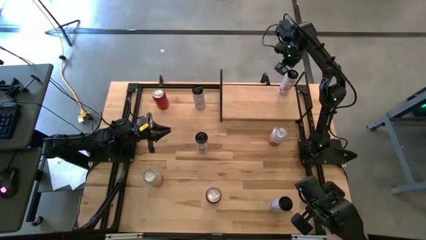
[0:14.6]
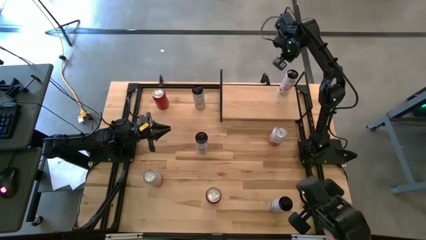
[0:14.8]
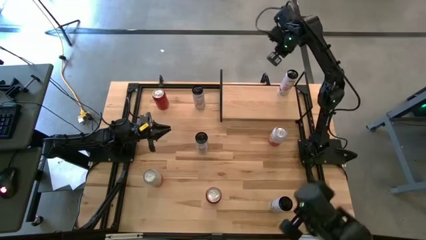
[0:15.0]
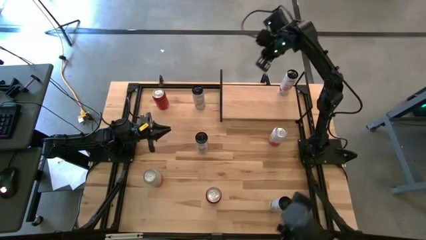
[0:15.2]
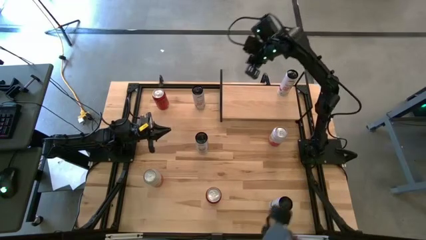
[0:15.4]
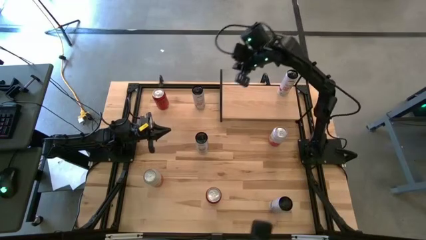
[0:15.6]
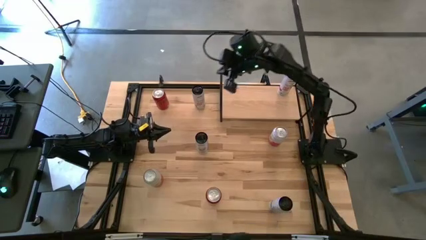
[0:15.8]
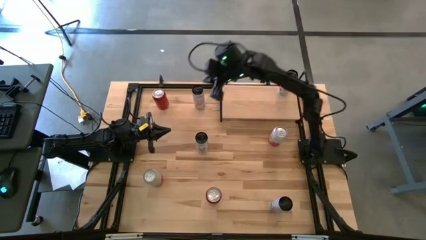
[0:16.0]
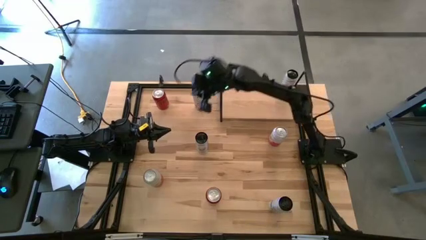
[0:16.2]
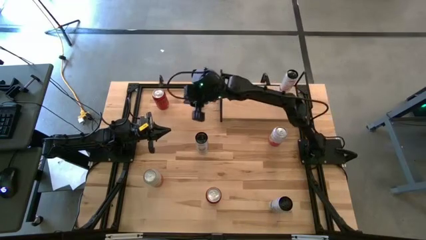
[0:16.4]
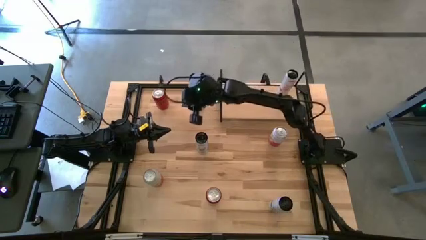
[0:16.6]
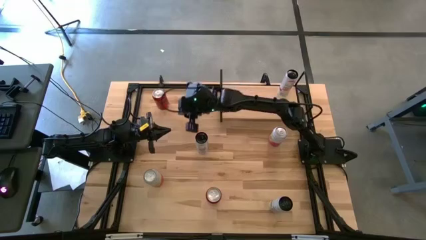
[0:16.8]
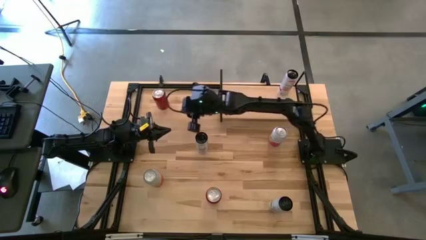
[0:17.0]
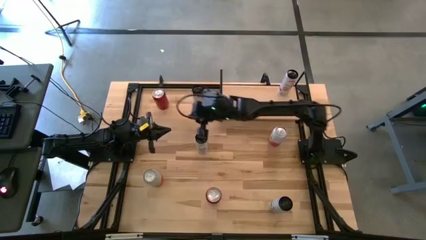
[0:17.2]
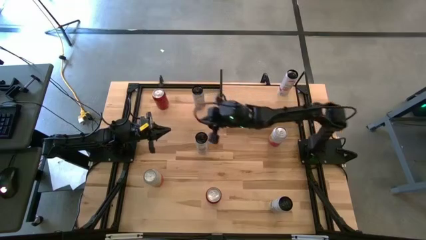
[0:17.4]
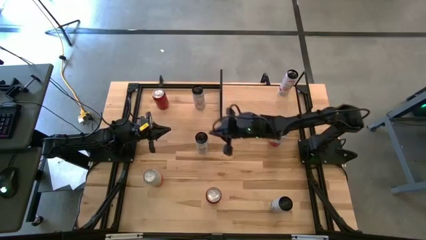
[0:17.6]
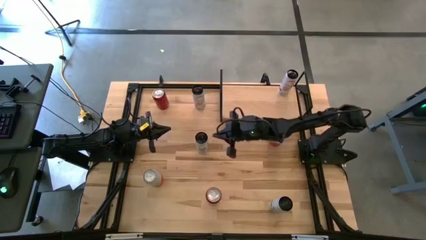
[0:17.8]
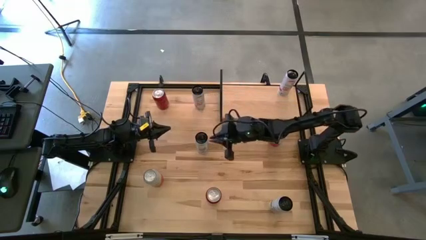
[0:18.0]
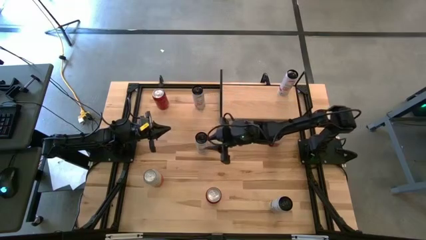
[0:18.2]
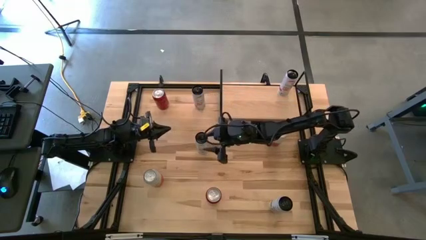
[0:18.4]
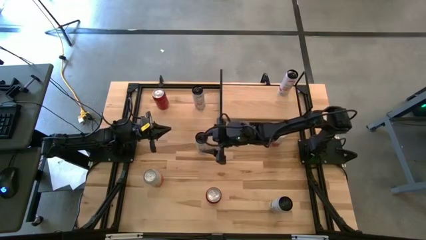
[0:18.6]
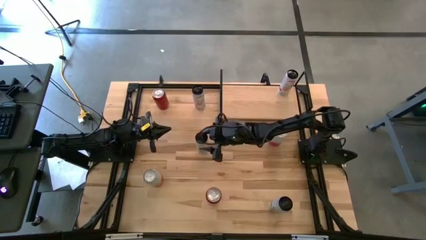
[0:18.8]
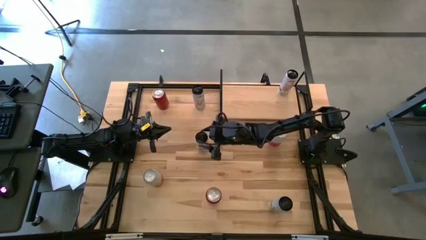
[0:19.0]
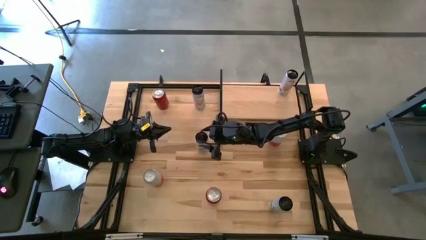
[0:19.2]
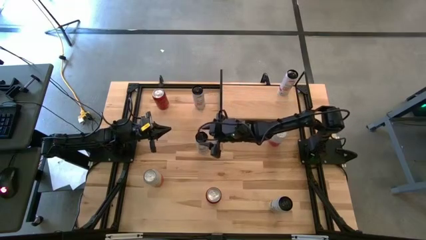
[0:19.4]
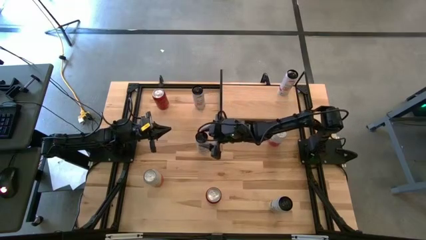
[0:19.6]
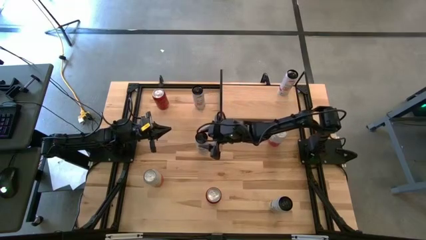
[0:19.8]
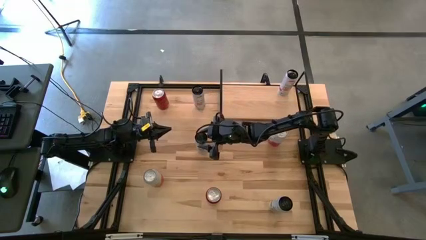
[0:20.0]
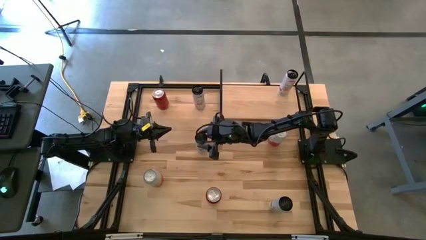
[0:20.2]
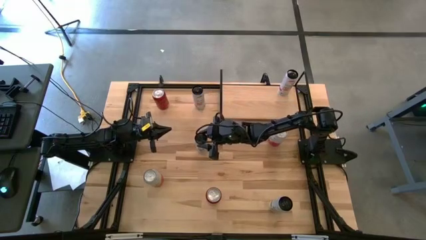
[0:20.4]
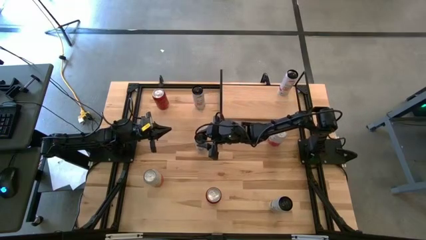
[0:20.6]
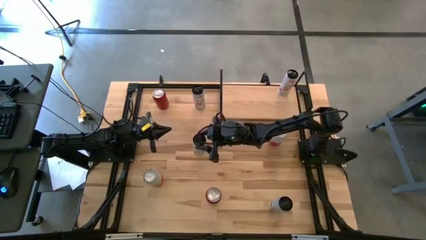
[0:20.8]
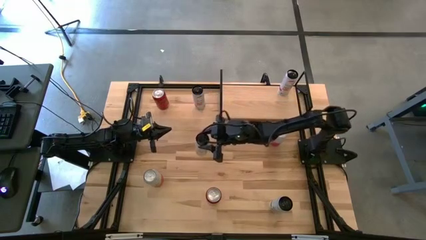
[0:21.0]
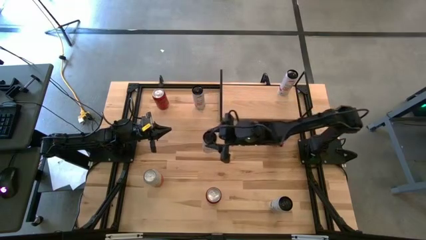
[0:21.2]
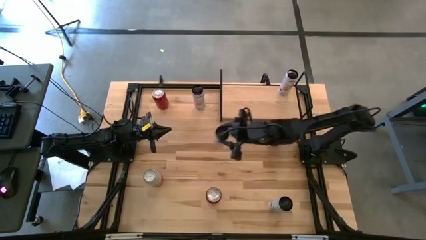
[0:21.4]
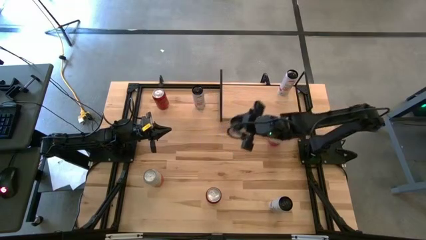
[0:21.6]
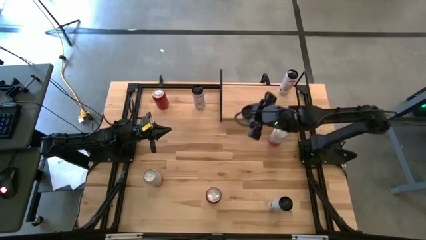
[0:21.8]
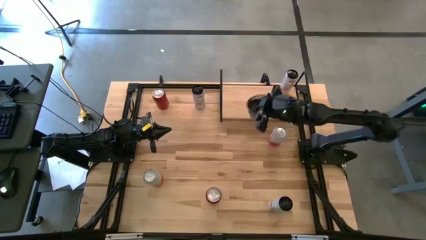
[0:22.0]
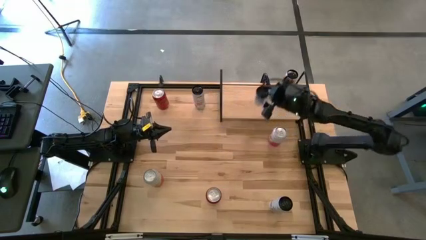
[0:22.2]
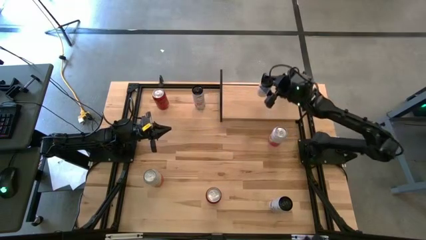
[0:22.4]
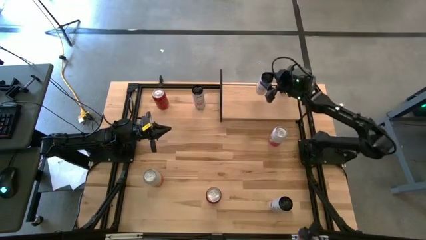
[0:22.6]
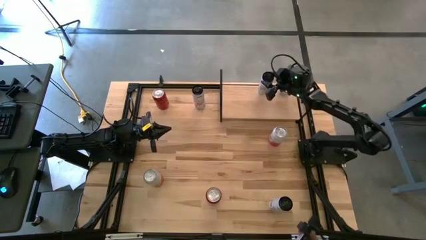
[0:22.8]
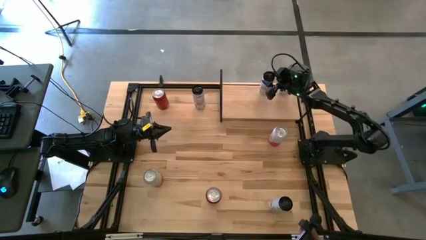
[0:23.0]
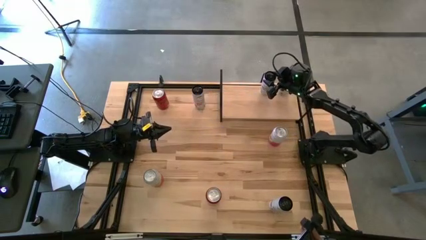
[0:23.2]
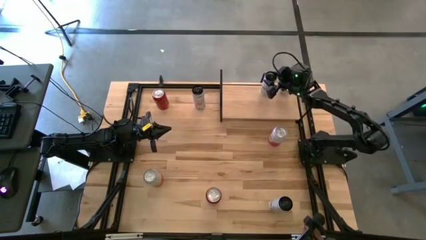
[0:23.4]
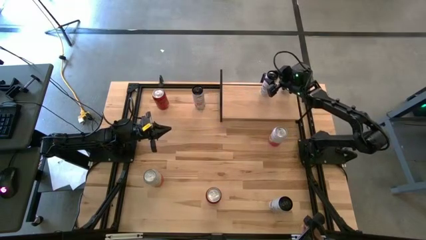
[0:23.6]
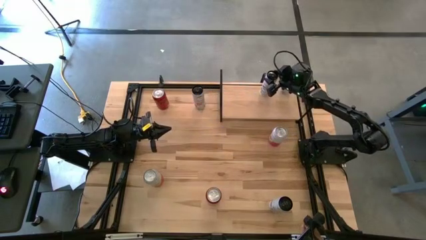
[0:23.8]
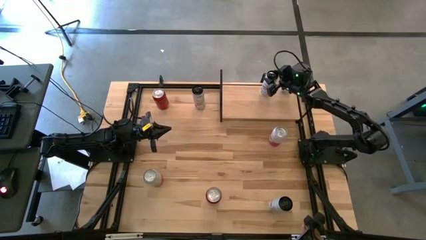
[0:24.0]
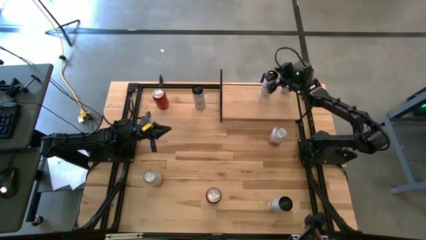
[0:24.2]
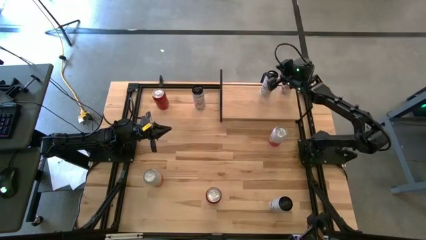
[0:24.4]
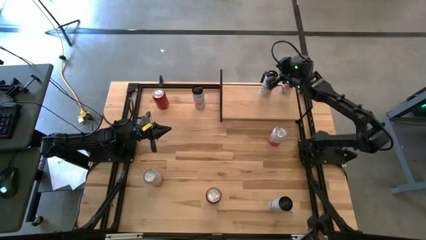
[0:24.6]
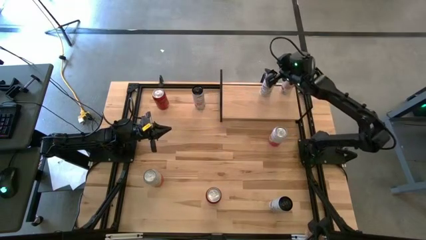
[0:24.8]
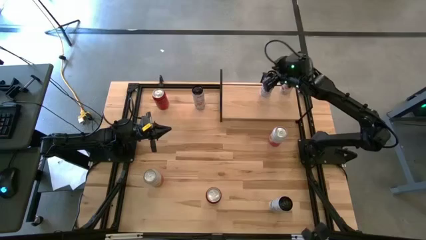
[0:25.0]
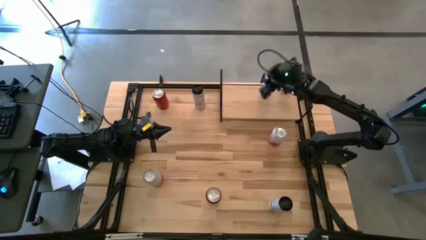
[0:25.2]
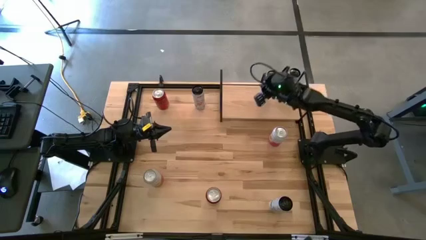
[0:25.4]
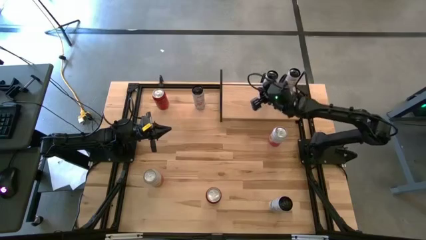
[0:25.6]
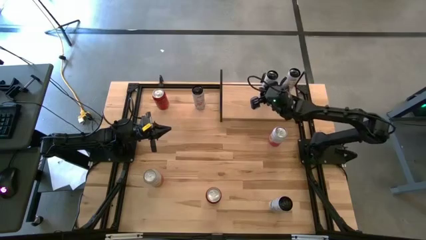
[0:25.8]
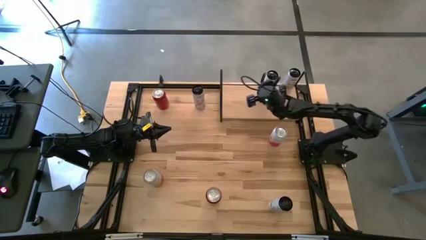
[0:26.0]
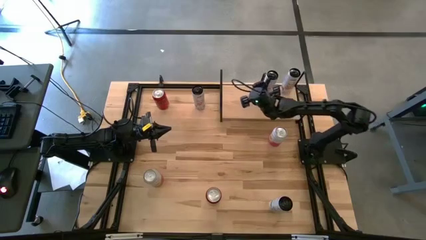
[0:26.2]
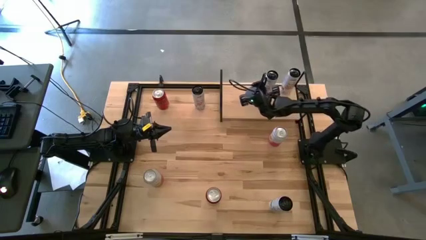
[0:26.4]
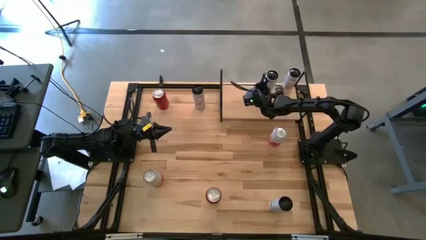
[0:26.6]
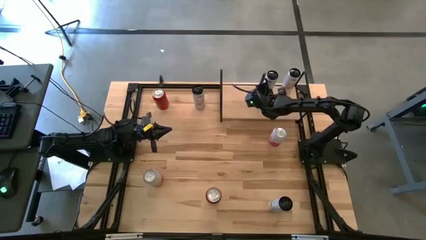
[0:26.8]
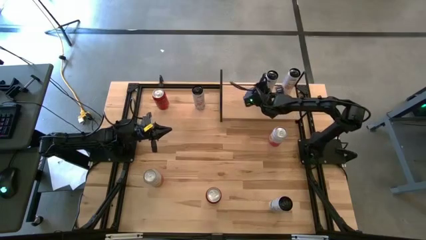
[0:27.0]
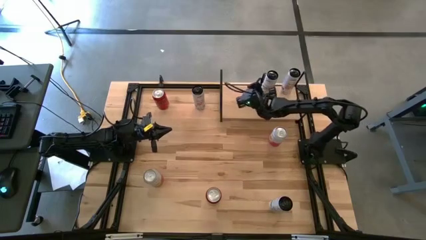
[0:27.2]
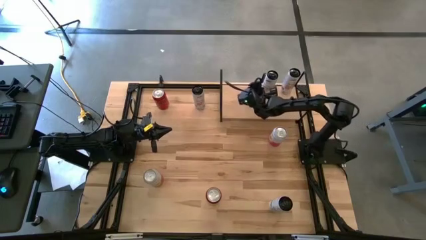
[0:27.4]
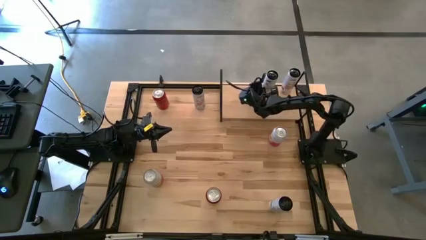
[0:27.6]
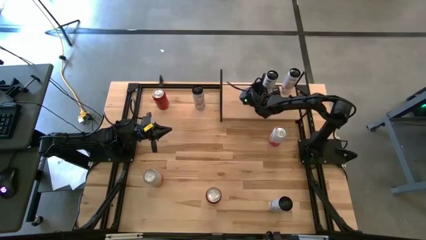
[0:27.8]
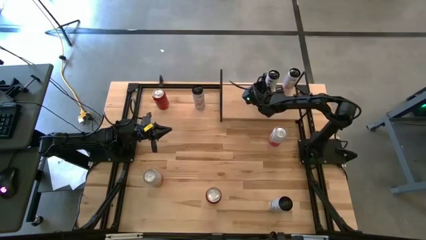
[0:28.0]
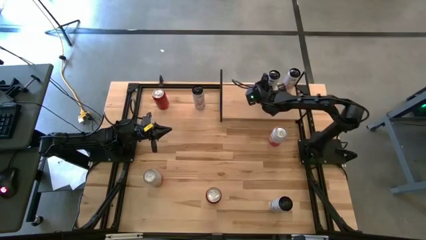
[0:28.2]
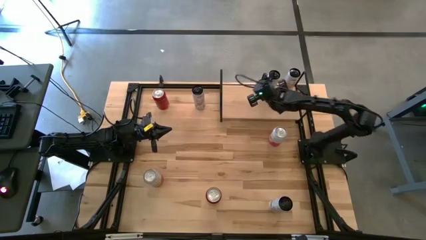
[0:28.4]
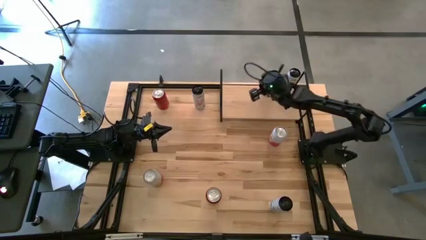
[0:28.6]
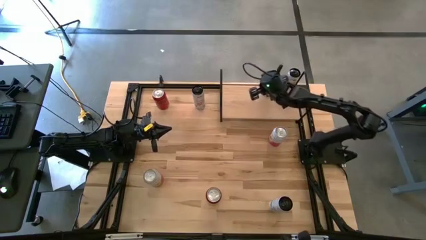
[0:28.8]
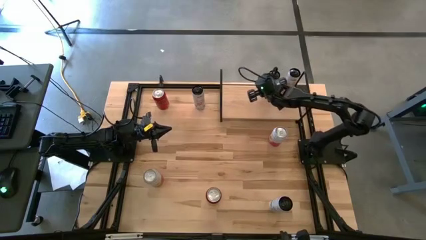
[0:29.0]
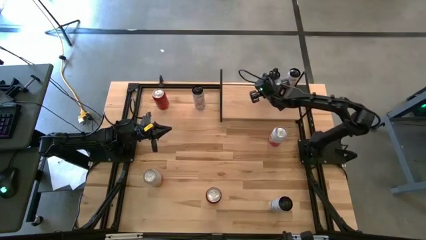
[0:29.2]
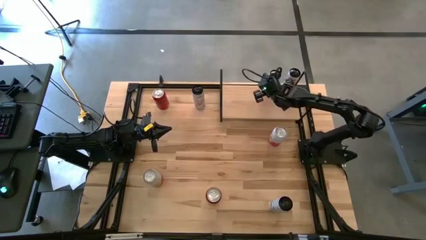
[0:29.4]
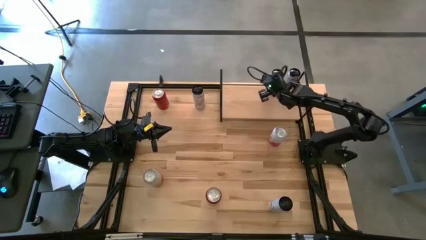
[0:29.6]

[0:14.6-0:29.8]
Task: Place canned beverage on shelf
Put the left white and blue soda can on the shelf
